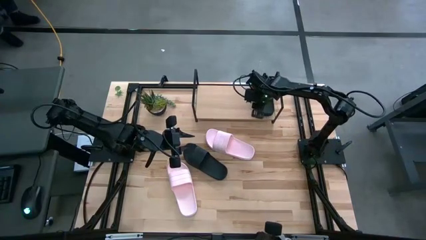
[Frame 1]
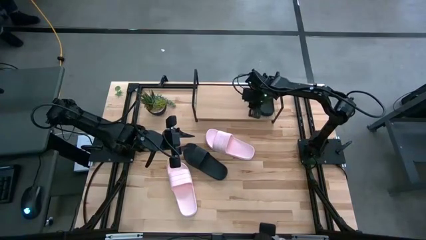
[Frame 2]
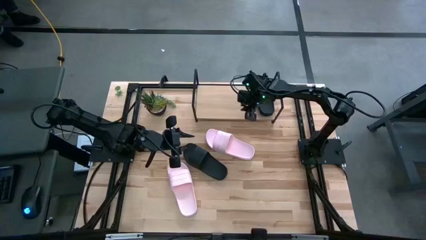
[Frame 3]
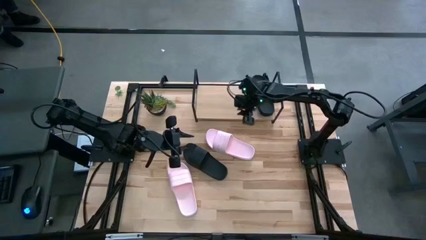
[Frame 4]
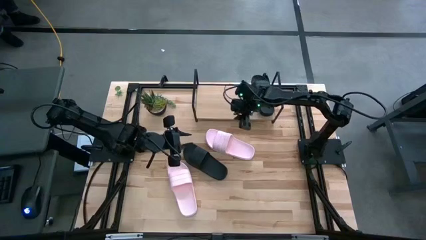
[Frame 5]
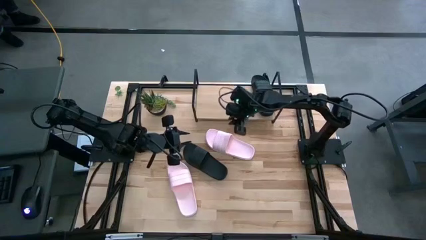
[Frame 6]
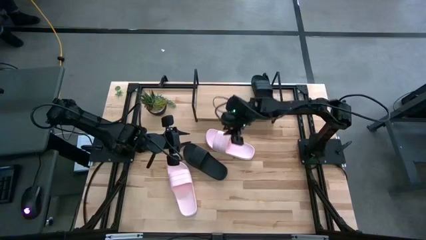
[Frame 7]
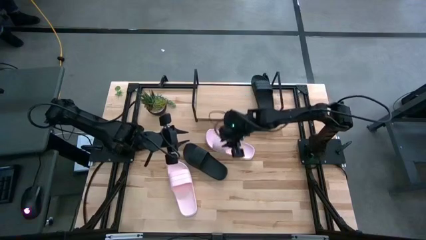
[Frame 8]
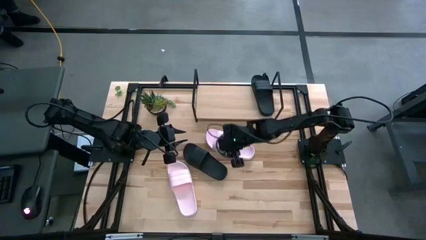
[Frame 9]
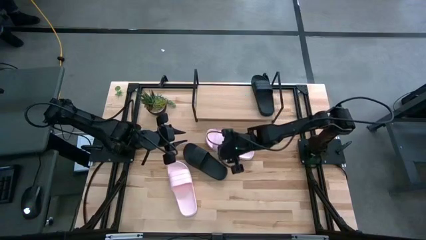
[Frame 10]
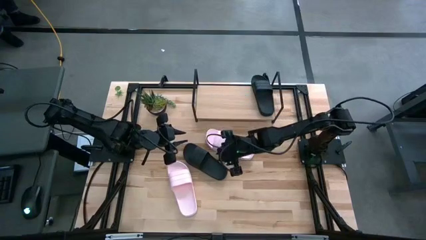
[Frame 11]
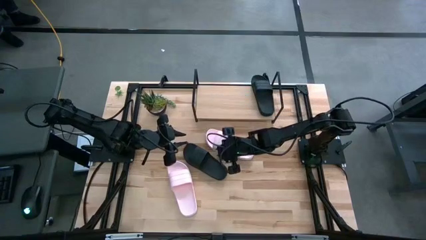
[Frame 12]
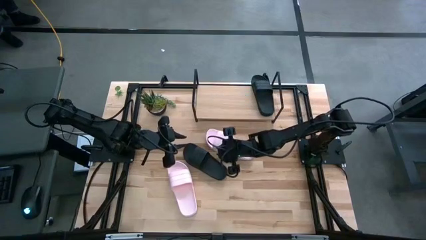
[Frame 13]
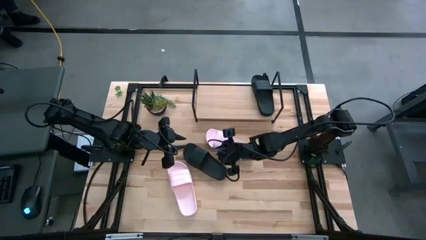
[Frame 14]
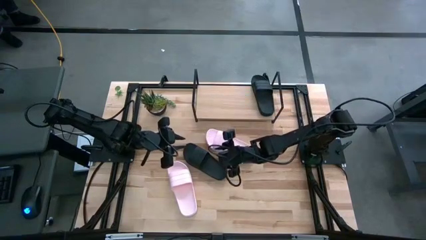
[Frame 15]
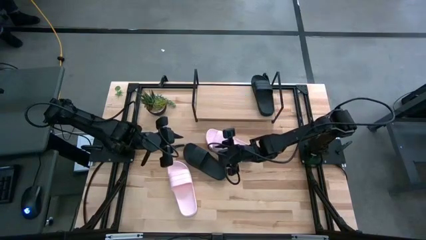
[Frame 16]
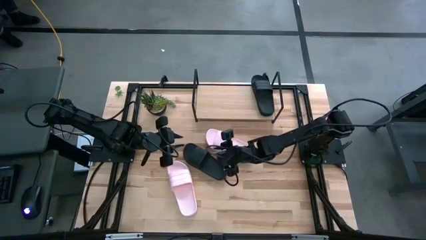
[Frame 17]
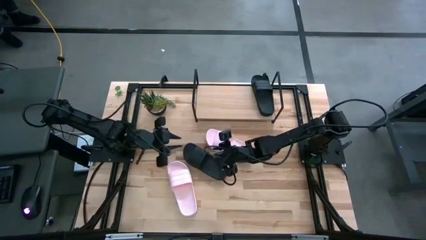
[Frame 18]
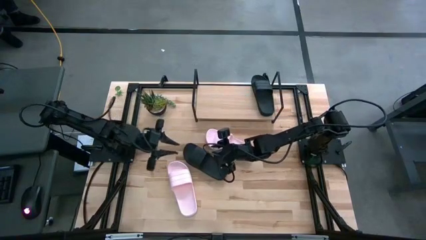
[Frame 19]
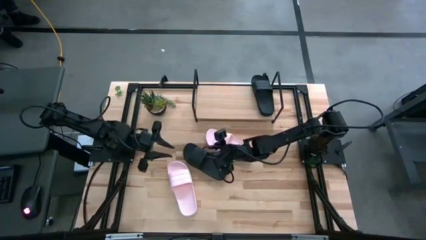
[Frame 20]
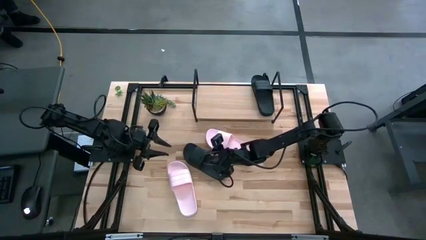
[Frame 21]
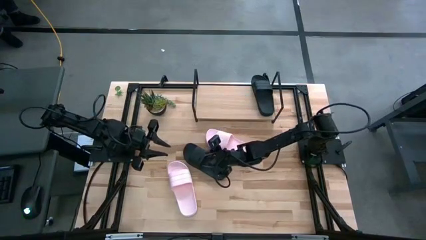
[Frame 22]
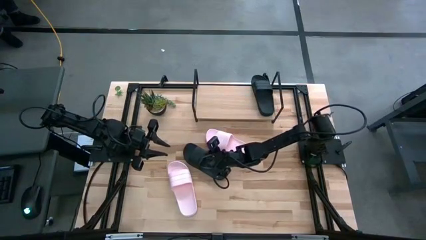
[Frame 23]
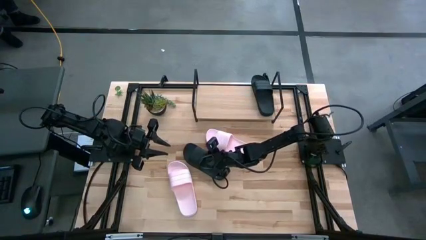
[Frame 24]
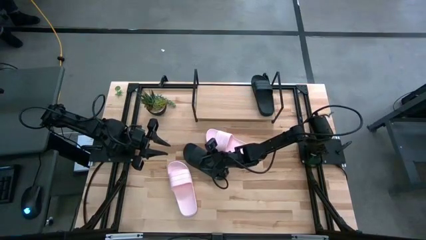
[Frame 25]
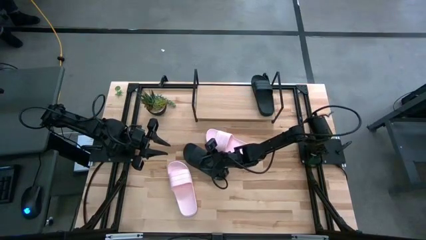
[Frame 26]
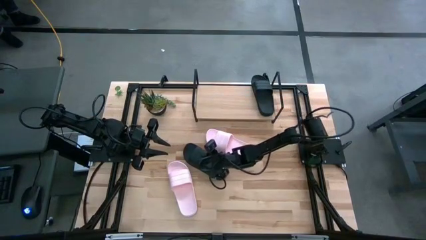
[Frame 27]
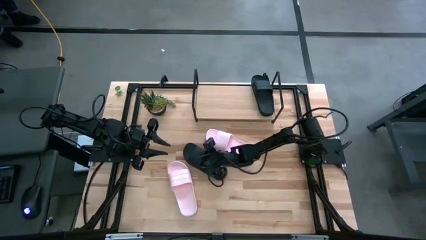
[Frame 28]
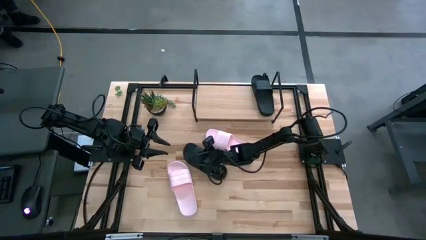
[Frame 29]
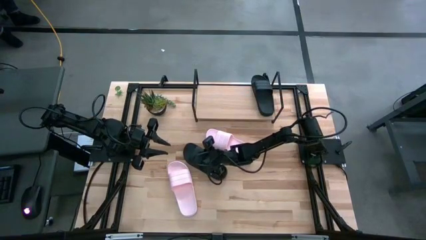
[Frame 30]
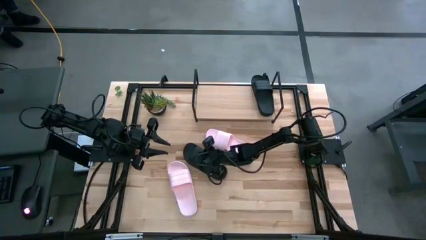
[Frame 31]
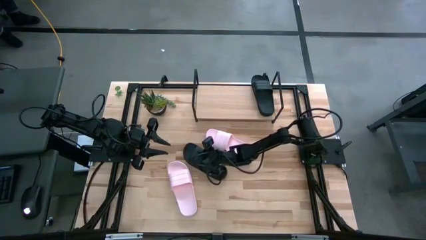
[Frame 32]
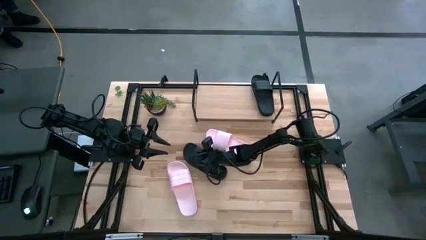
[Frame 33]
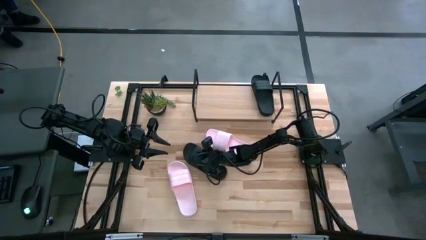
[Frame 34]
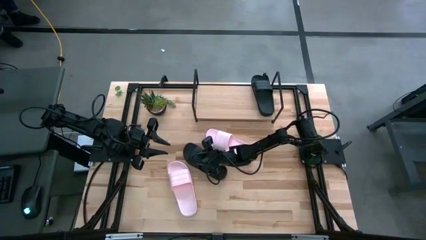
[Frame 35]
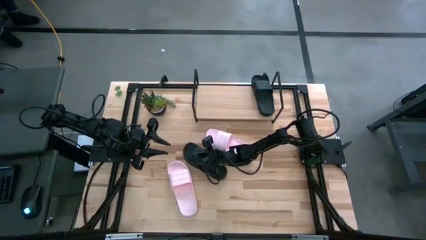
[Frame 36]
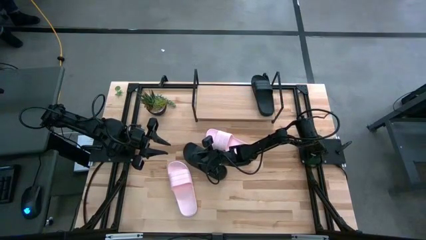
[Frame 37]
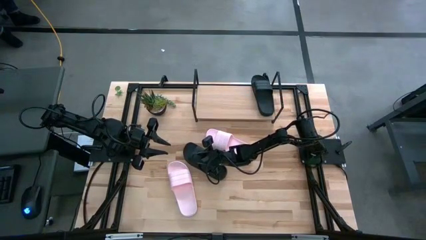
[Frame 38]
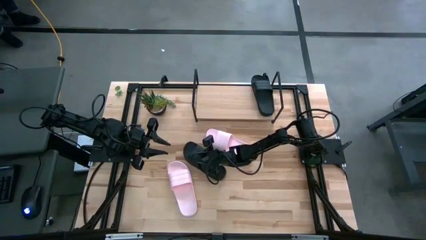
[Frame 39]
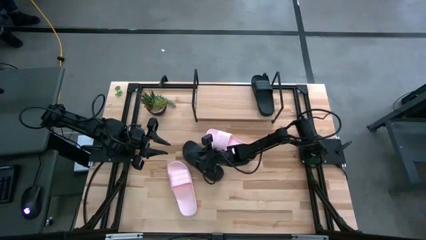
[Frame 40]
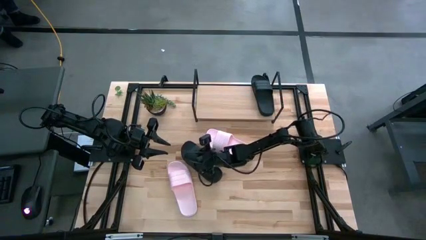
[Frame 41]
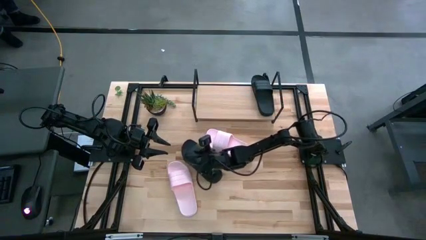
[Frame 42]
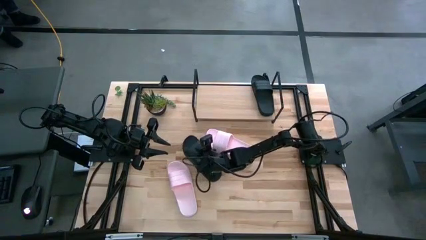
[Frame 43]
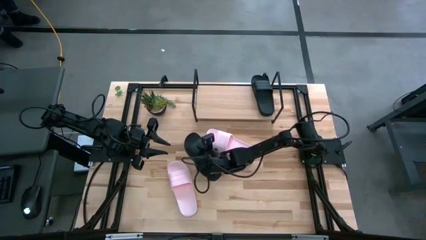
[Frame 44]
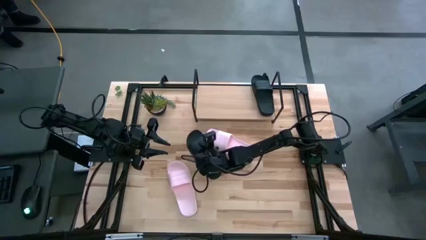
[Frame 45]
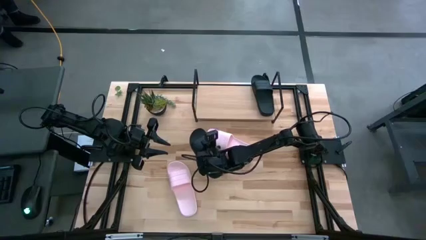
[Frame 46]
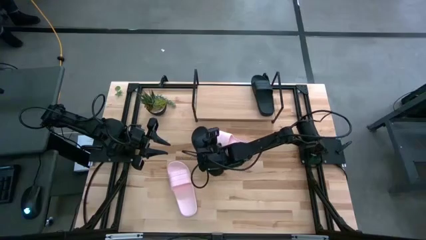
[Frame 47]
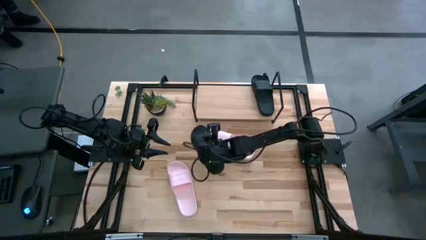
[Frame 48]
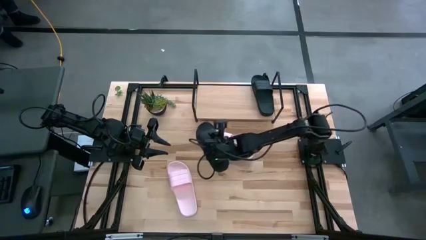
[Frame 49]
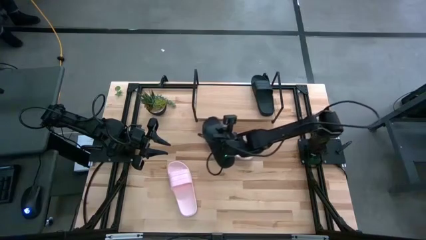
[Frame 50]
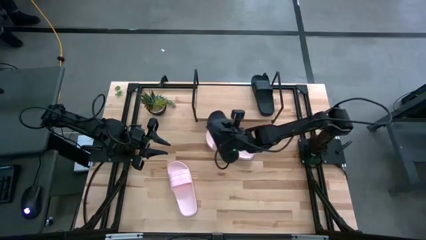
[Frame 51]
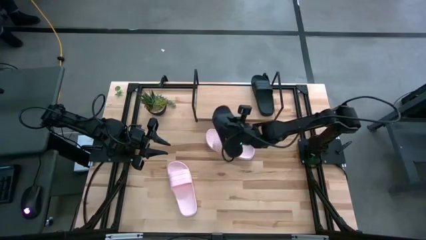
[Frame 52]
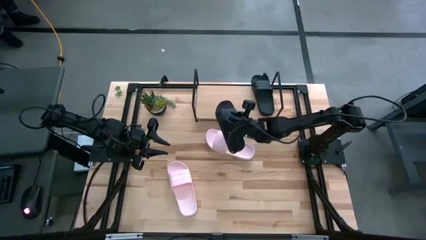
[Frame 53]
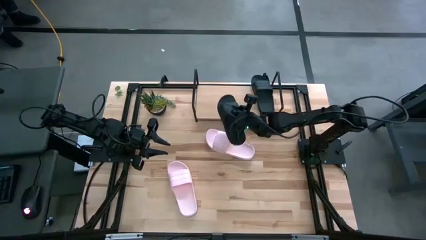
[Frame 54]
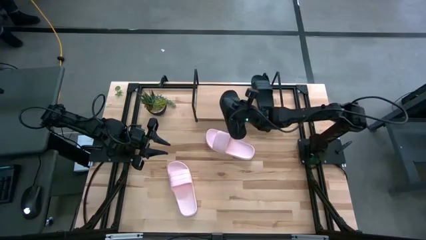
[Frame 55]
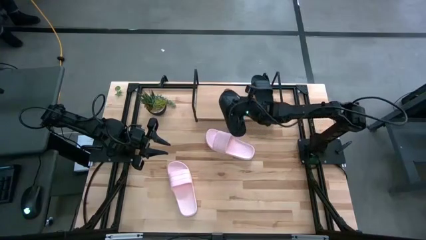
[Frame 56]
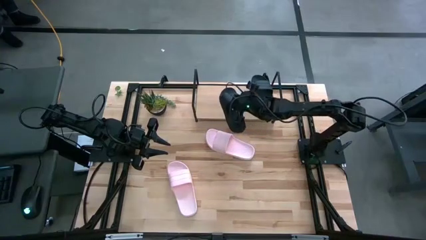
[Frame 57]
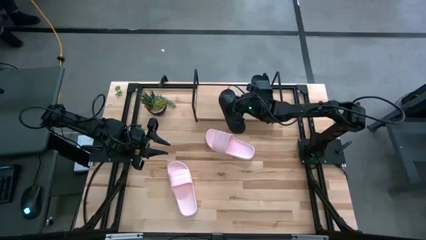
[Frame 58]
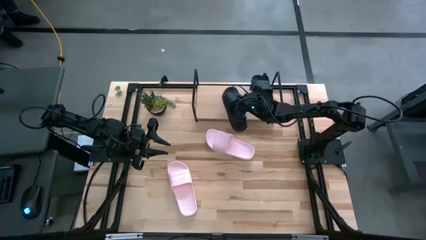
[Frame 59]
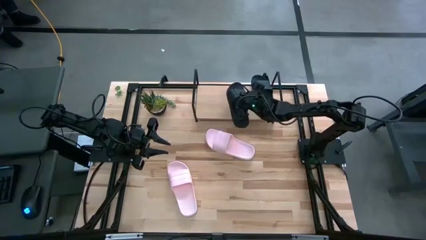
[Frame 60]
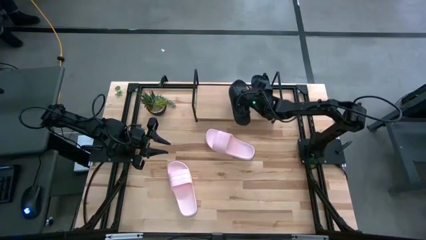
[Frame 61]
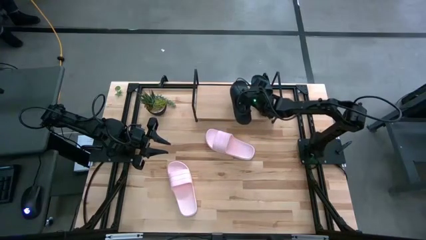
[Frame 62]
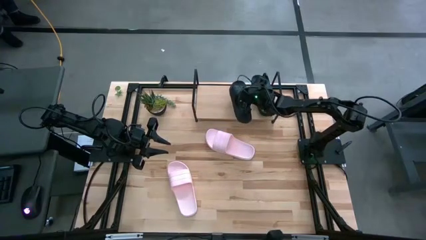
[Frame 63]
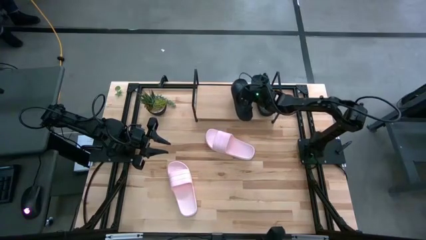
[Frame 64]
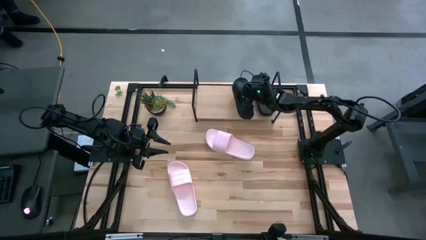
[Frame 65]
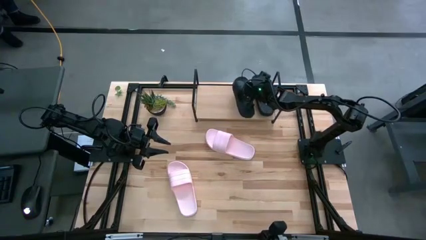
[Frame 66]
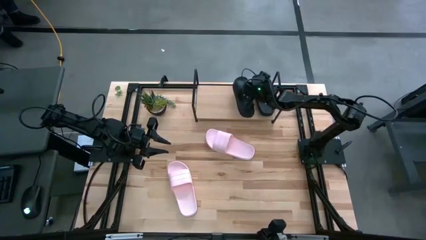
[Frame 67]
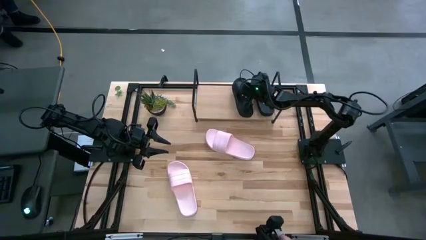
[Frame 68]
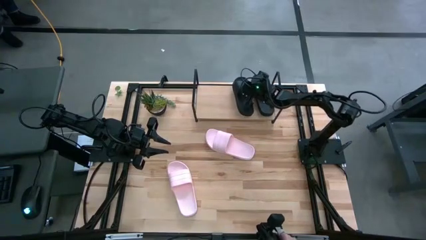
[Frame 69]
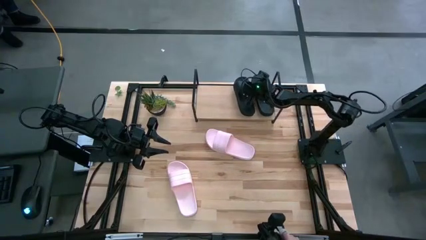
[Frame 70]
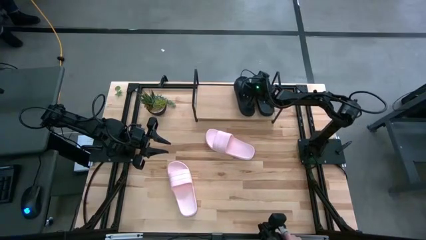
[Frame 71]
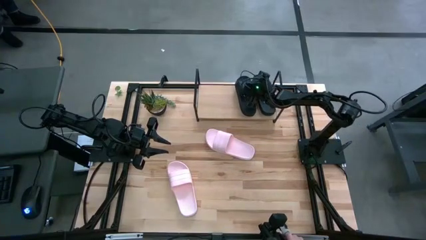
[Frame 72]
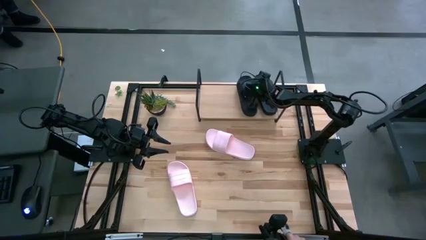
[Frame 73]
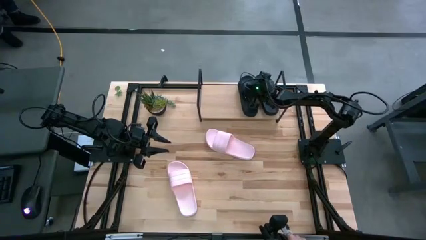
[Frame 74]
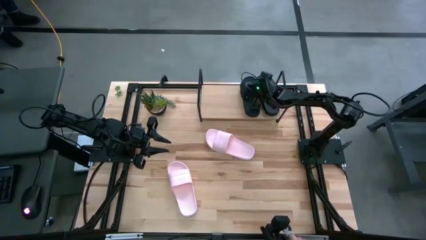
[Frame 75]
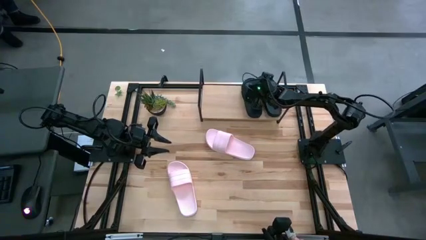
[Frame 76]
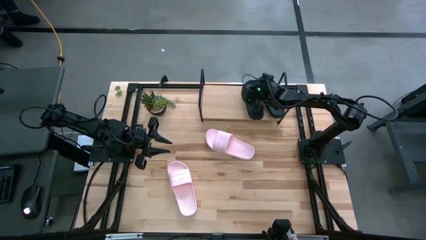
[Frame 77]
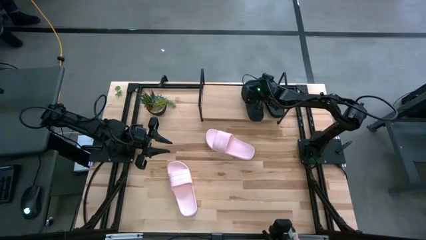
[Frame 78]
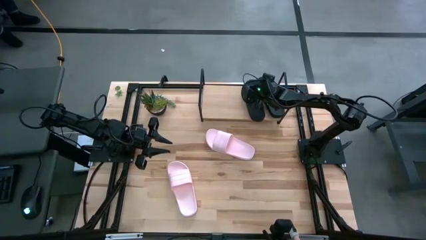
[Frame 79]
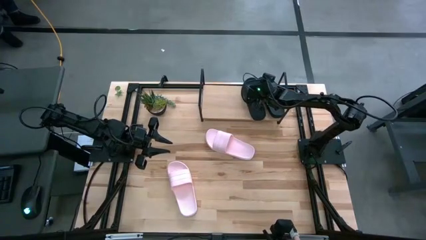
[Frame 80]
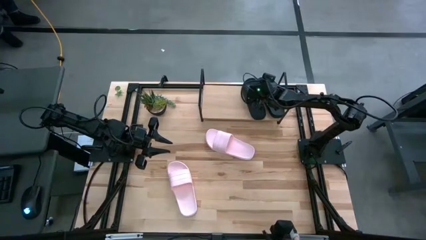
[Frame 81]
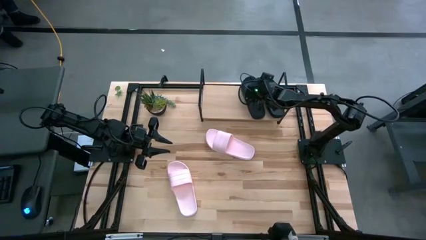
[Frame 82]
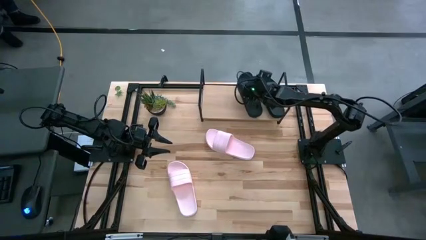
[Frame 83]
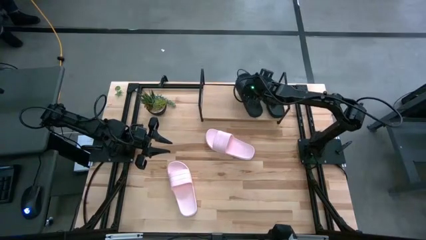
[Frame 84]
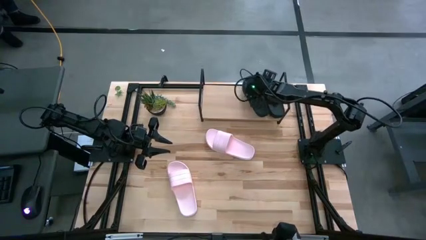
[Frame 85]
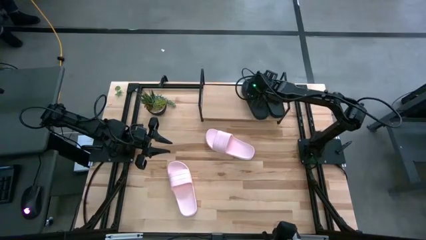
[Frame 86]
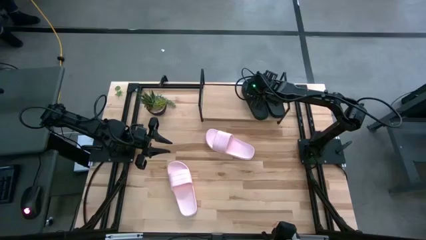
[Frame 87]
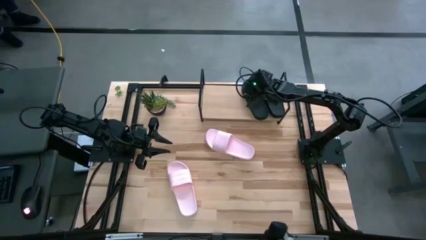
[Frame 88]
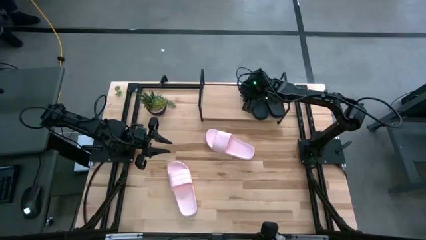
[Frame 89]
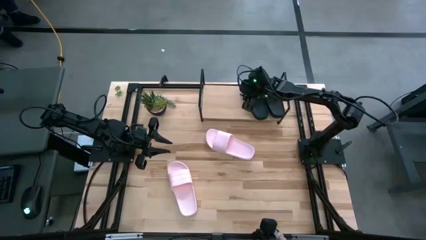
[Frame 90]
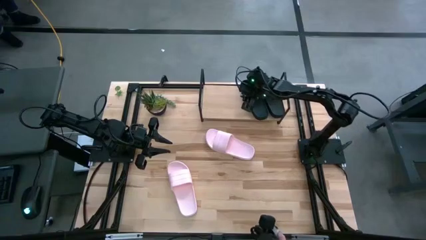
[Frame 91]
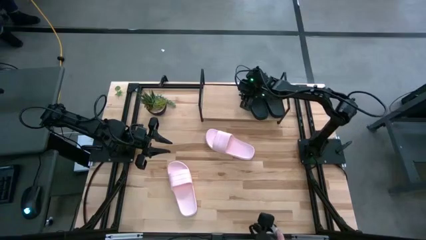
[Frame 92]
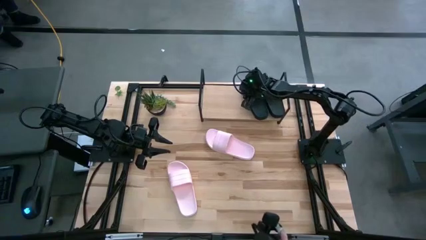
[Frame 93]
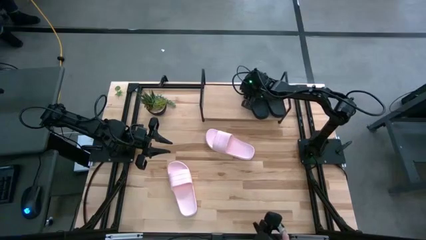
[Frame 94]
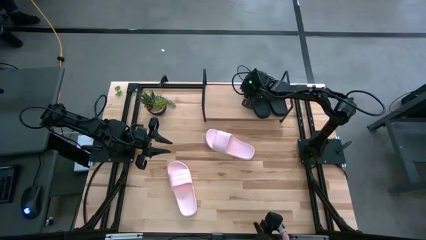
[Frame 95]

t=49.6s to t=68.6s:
Task: Pick and place slides into the shelf
Put the black slide on the shelf
